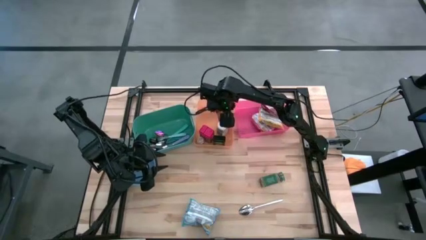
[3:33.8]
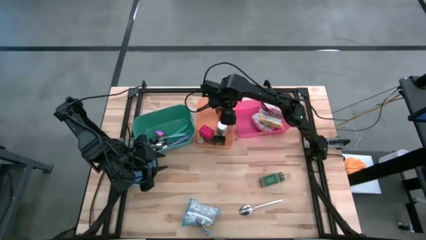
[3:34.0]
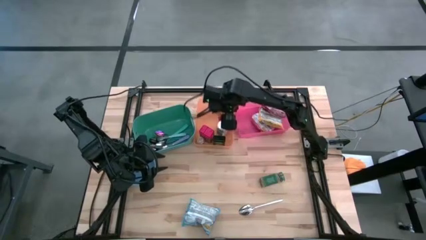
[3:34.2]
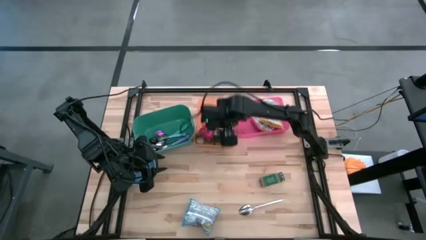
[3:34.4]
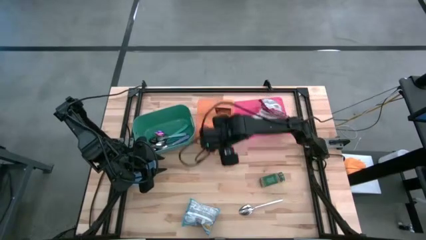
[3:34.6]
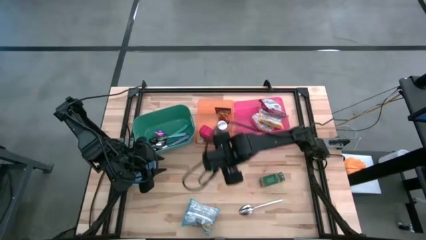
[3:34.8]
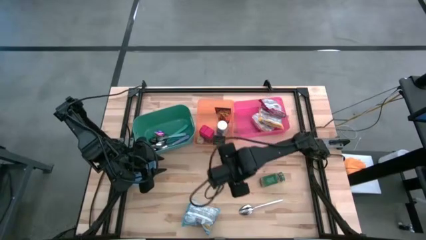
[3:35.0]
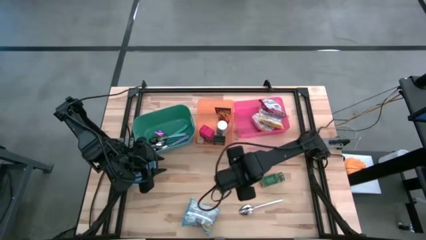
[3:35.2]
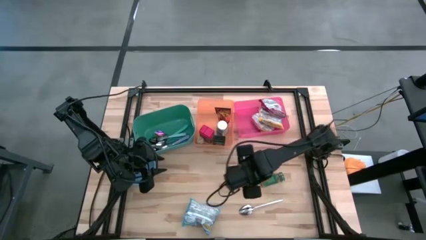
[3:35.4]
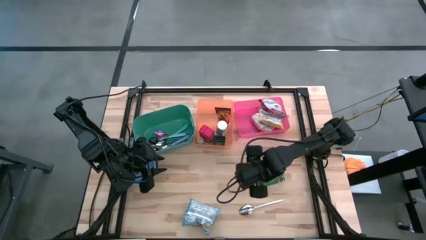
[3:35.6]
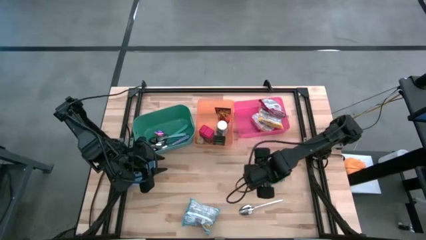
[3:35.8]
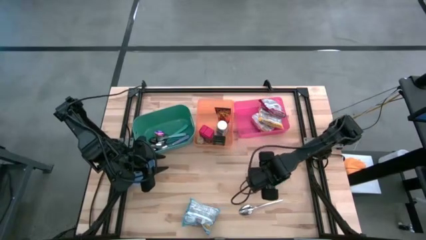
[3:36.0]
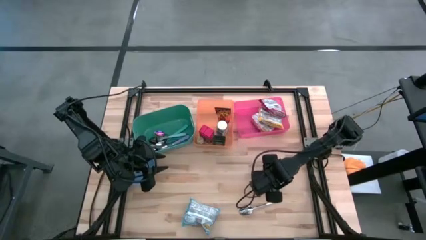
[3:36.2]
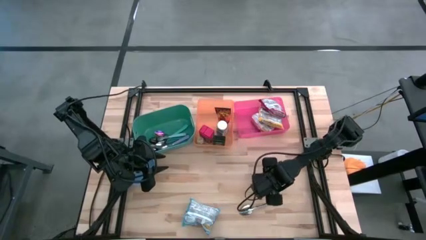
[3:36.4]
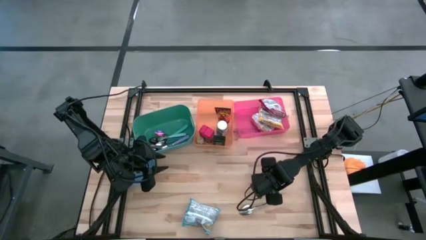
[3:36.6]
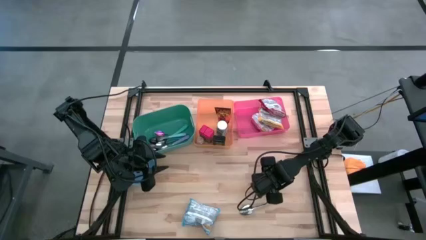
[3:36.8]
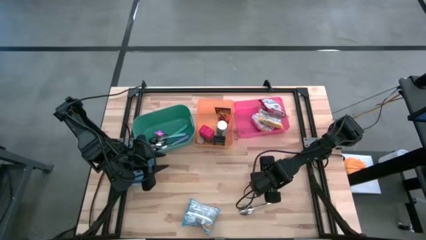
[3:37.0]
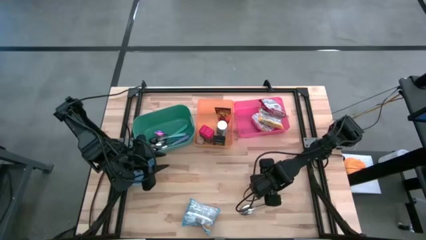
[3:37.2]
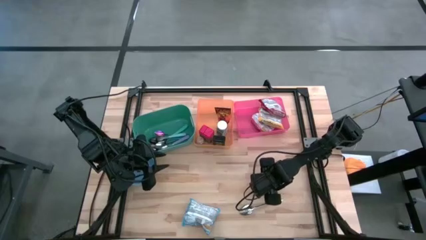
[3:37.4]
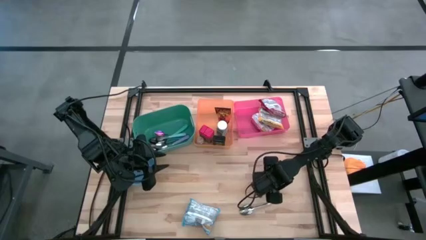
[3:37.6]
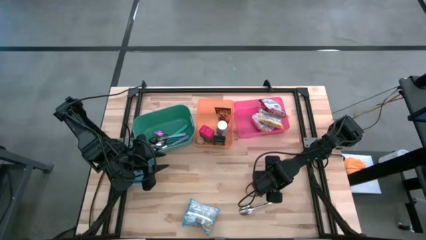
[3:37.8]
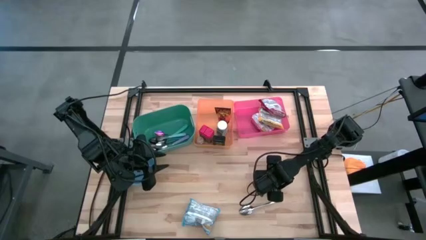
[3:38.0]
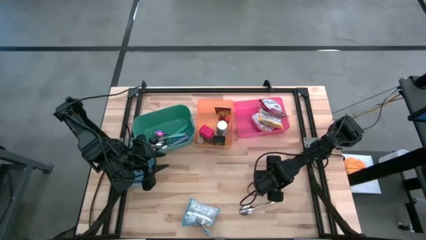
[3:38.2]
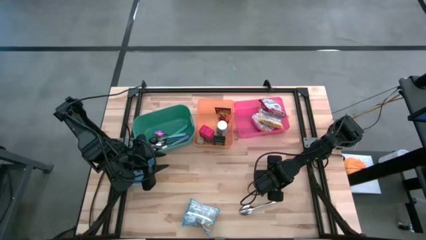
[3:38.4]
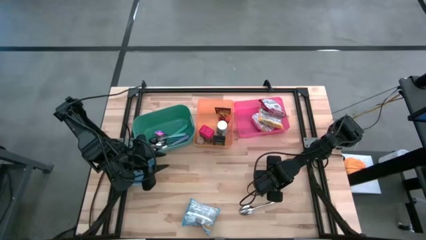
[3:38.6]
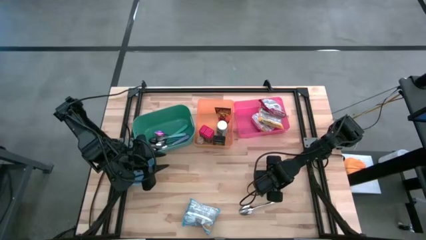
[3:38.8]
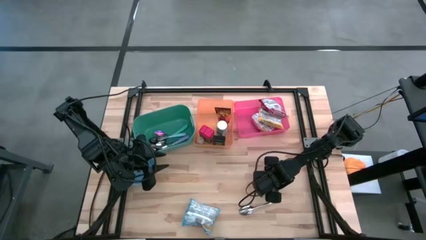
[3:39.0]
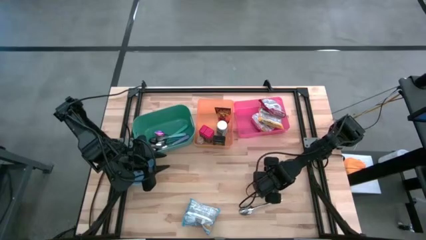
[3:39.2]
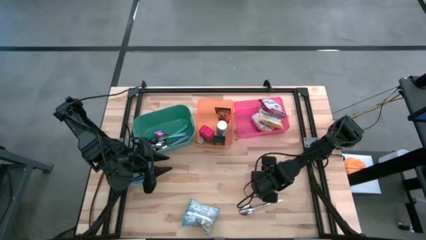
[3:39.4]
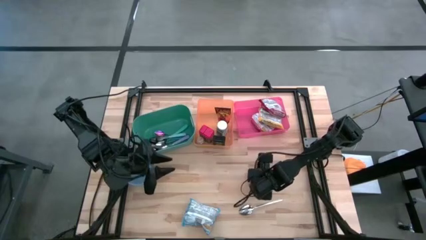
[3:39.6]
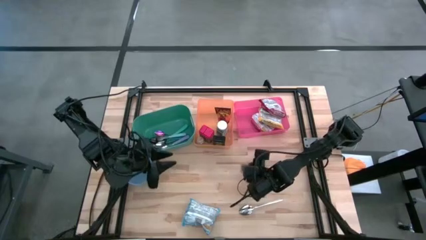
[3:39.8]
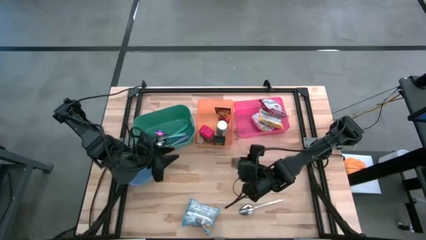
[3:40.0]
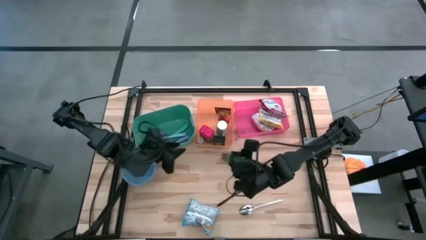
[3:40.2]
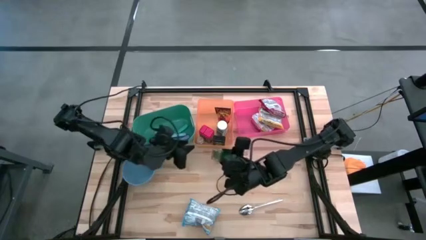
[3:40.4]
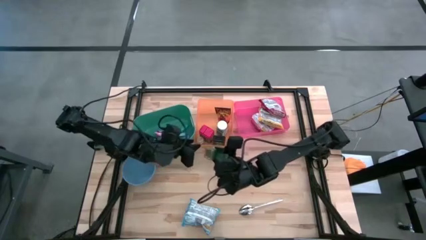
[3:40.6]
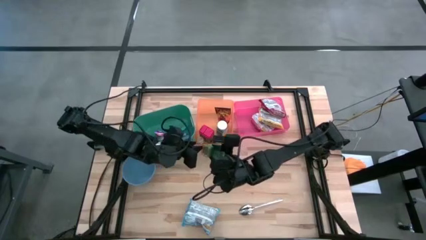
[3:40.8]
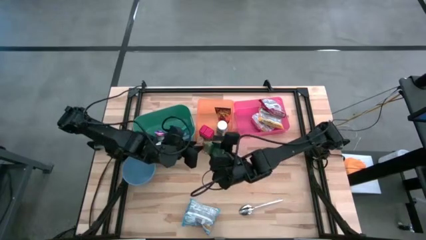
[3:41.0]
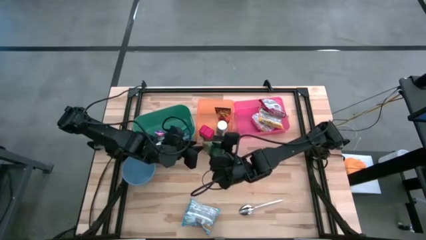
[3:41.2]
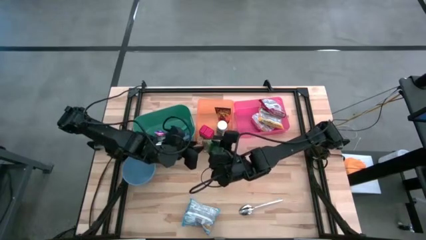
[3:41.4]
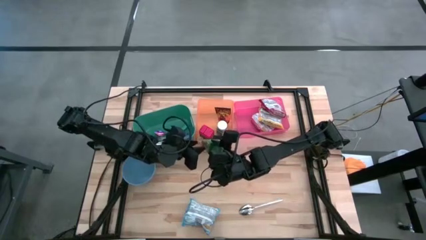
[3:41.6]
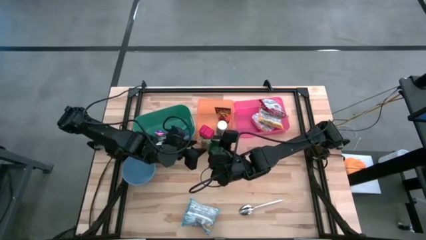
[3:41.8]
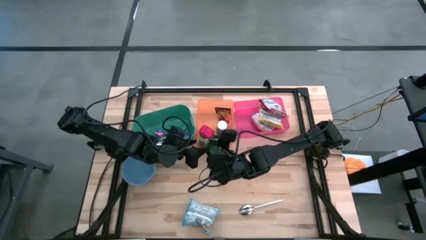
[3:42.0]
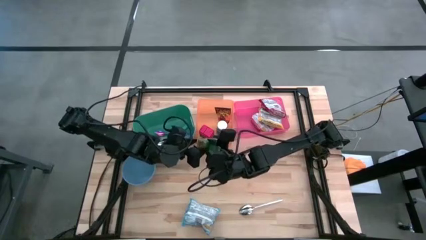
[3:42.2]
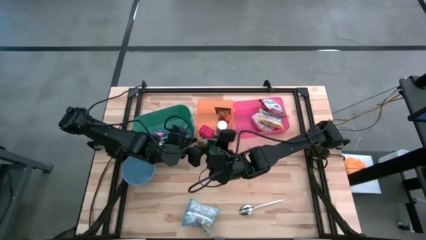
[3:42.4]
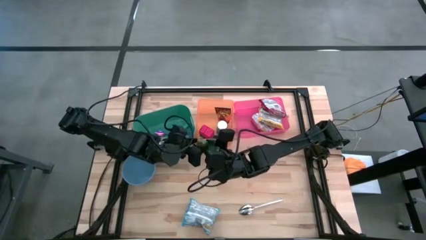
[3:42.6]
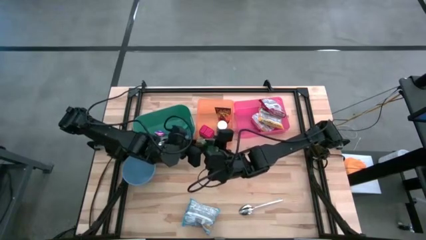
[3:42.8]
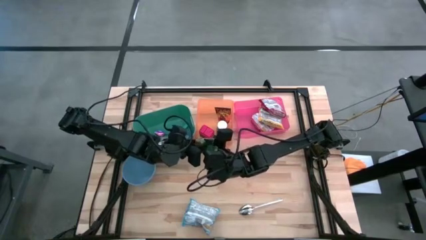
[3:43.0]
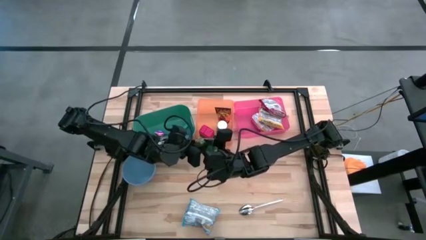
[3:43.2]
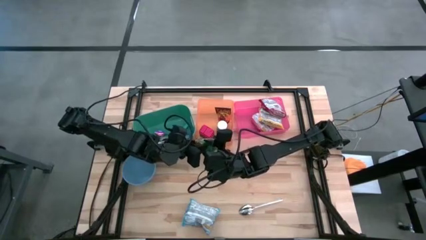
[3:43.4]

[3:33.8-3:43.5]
Put the green seasoning bottle into the orange bin

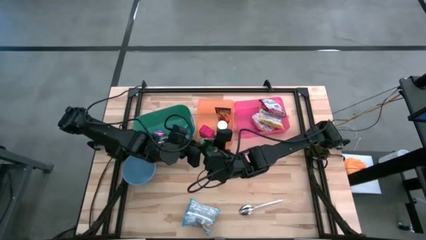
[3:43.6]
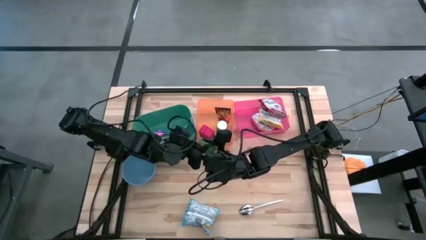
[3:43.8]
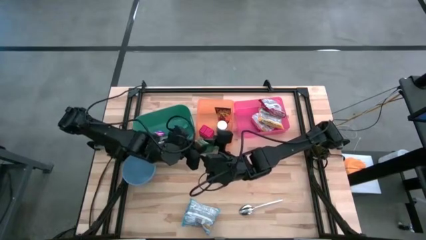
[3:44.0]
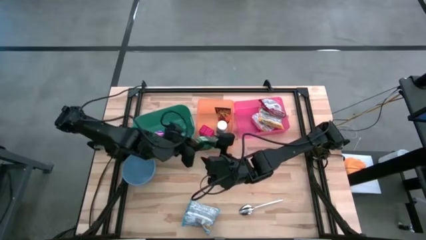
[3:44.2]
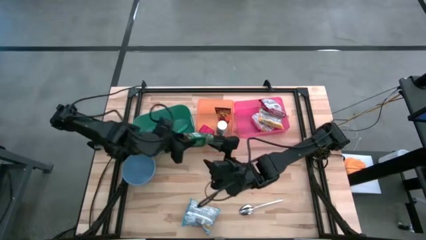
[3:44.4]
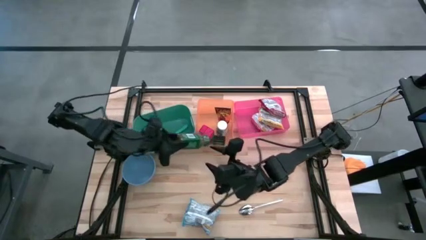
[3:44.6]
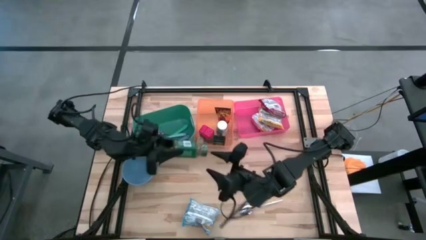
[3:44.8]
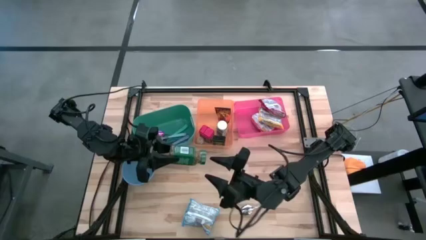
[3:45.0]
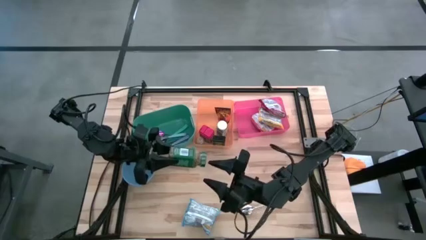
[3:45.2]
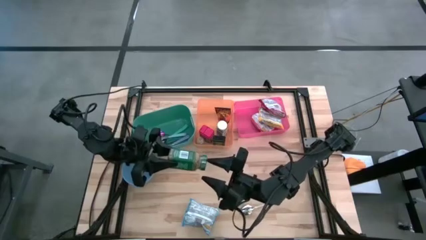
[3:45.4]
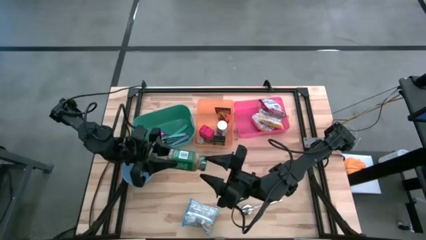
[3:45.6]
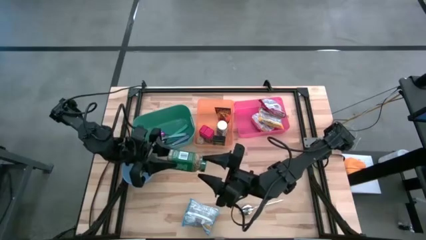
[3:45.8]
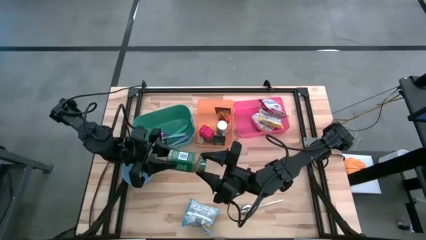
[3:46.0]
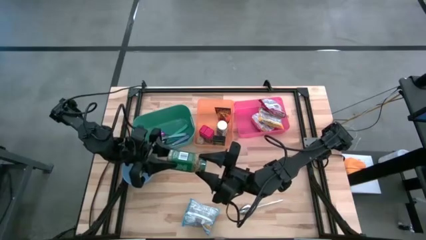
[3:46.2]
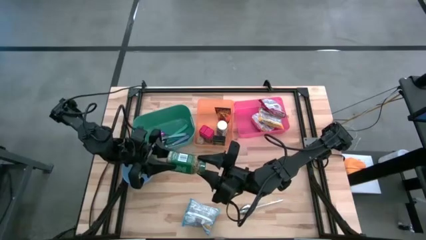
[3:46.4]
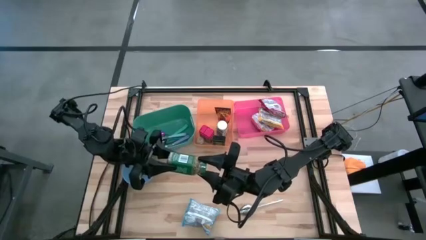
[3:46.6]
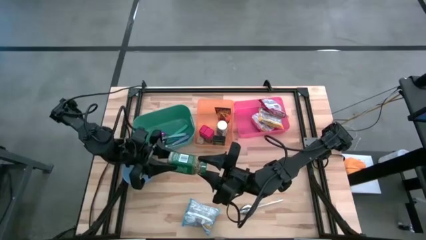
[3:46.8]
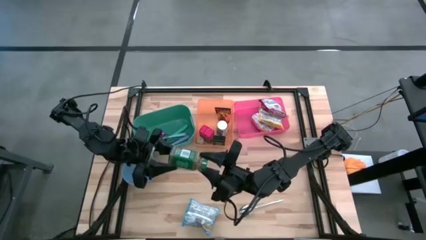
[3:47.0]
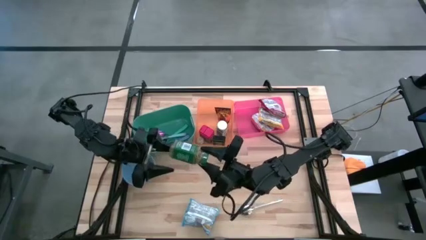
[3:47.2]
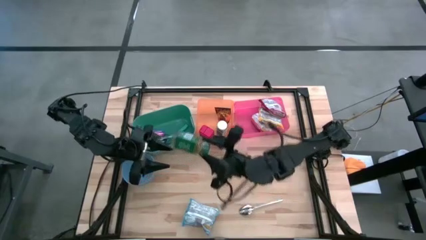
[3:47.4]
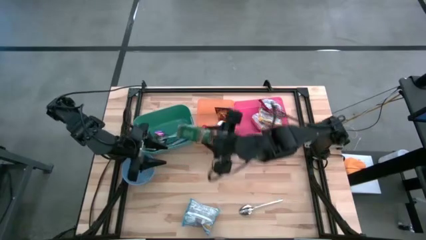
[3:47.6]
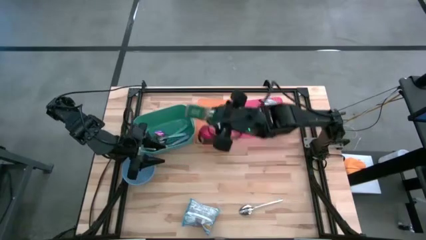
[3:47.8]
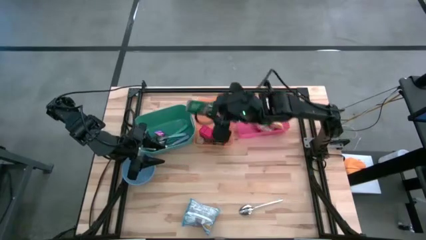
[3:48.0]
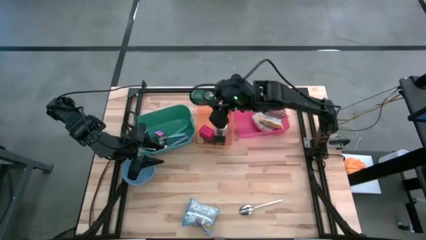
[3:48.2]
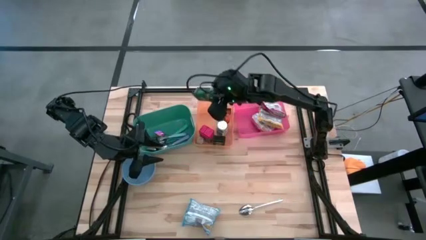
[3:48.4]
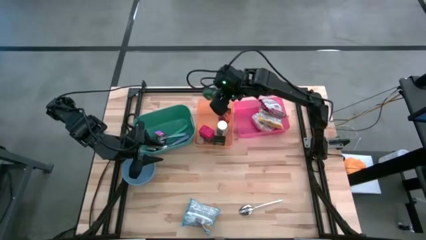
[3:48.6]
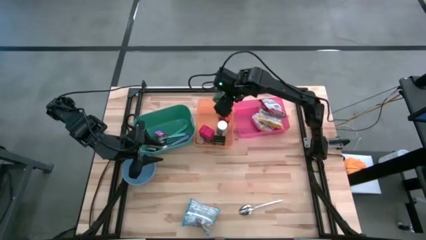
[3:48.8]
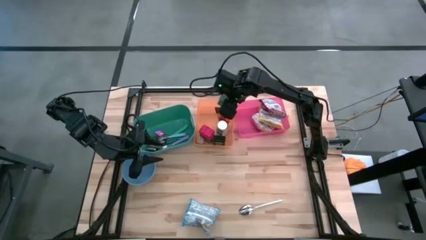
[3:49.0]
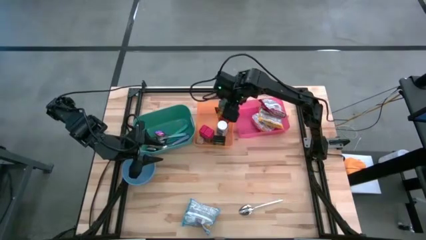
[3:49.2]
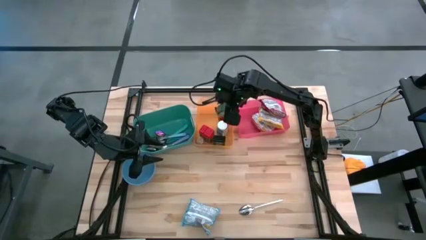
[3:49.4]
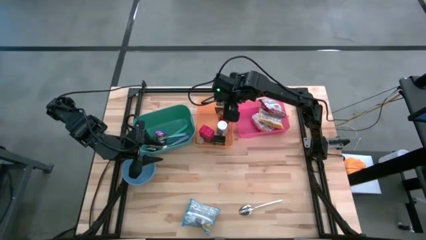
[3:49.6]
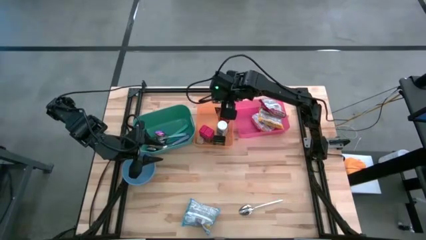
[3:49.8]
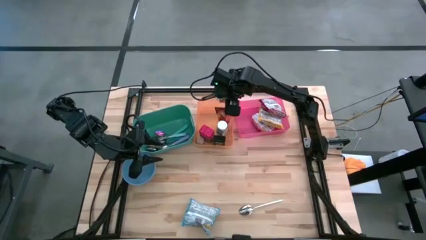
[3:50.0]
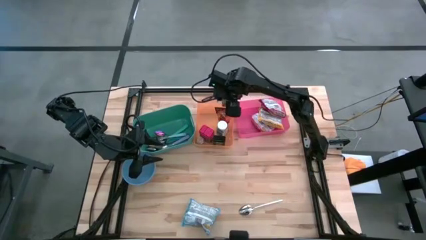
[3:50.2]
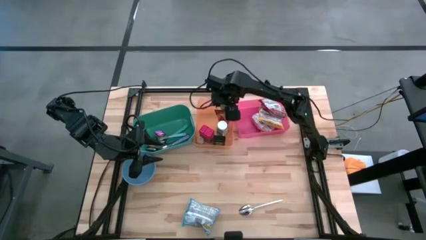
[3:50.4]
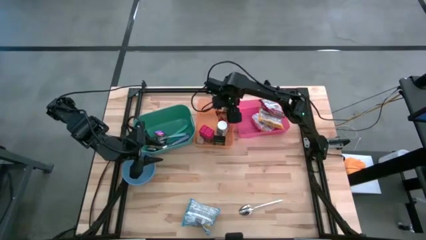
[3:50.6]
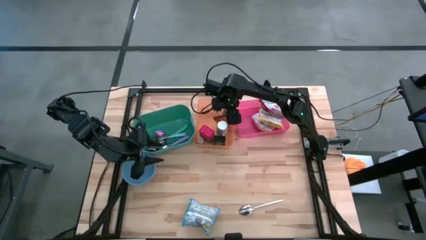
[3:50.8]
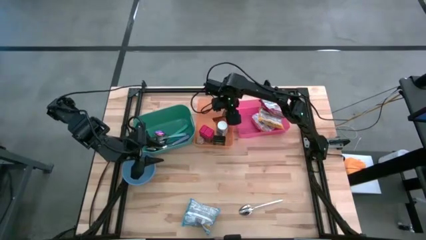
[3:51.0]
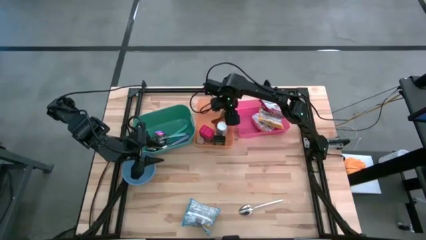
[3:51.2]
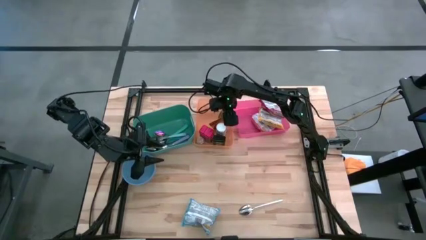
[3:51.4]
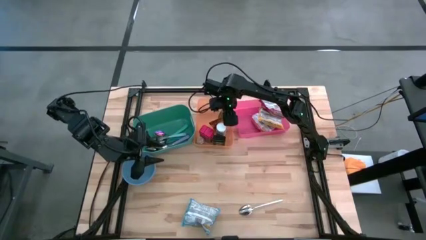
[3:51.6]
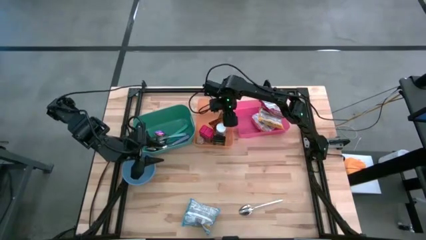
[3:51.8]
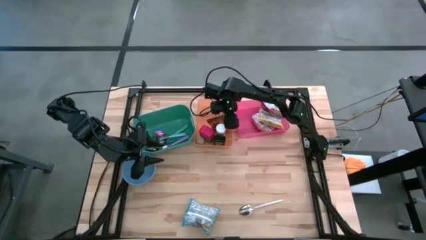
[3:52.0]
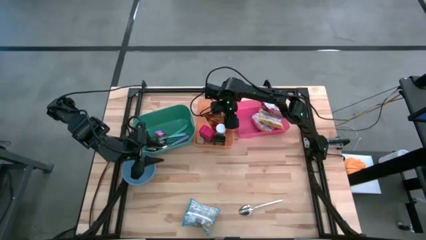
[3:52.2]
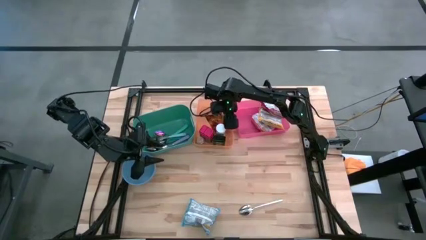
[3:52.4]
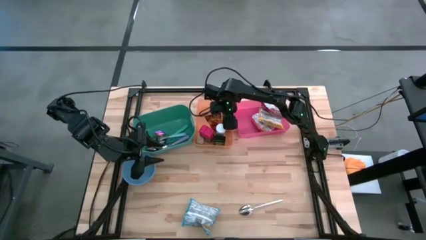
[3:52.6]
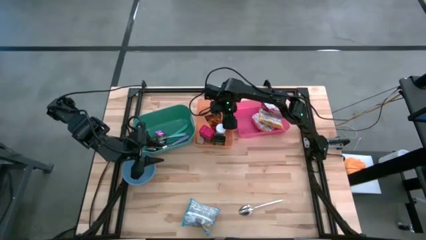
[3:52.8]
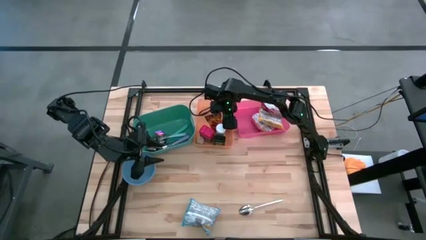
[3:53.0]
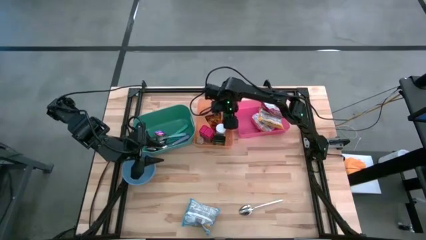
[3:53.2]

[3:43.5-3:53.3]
Put the green seasoning bottle into the orange bin
